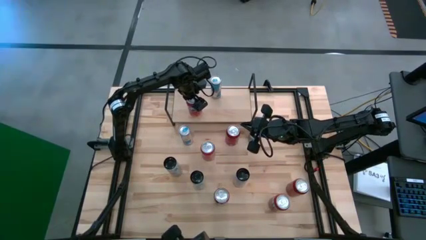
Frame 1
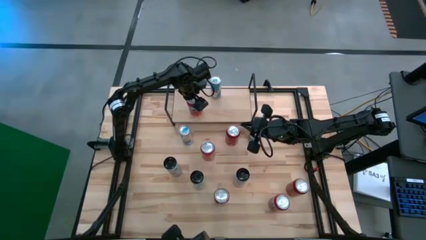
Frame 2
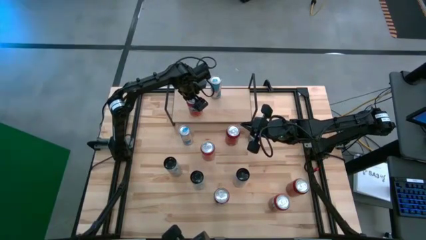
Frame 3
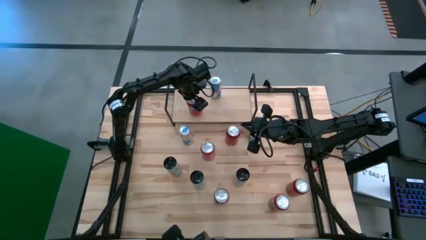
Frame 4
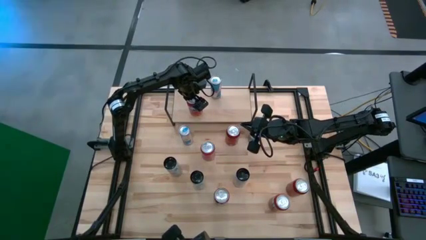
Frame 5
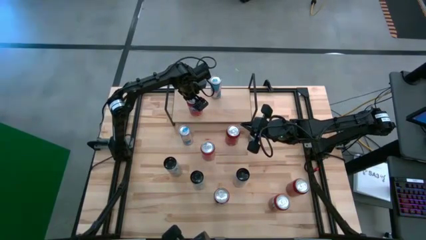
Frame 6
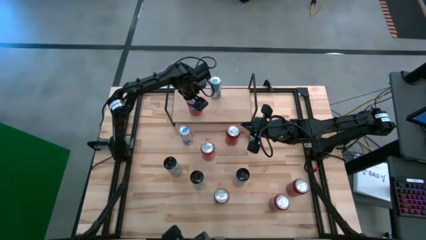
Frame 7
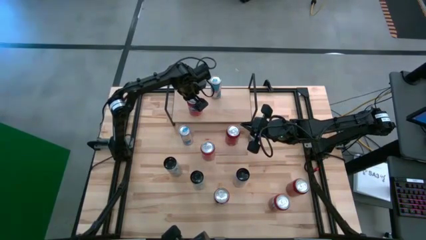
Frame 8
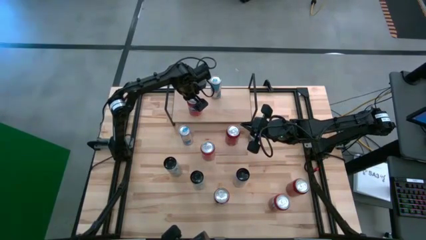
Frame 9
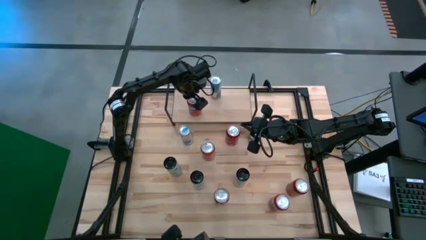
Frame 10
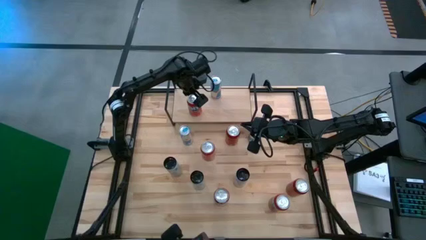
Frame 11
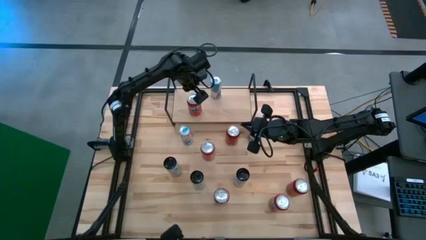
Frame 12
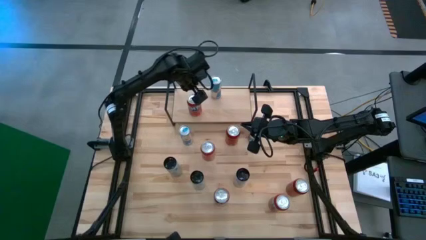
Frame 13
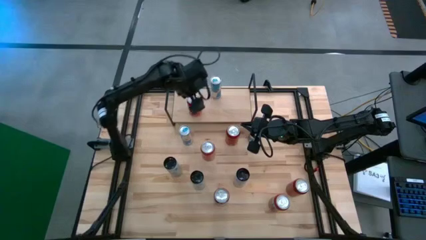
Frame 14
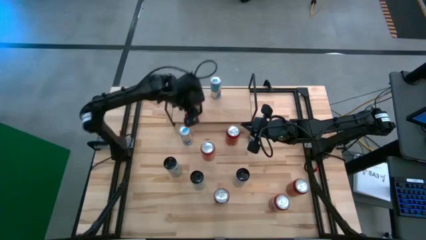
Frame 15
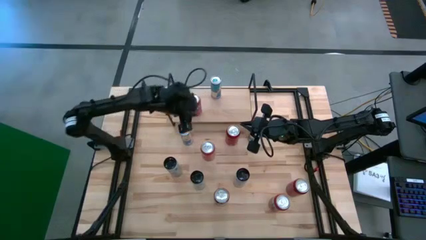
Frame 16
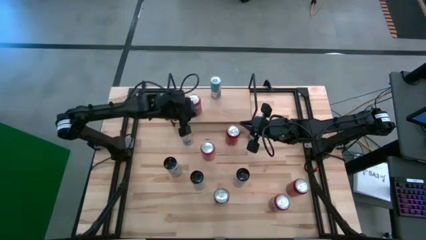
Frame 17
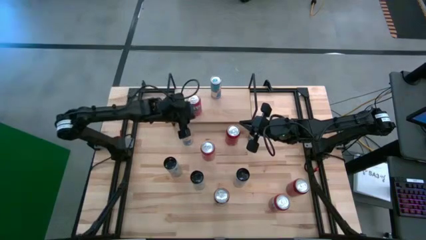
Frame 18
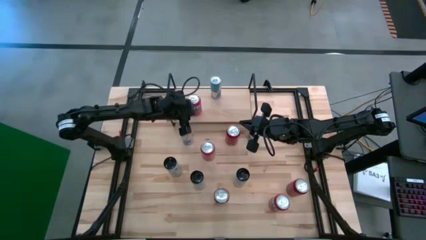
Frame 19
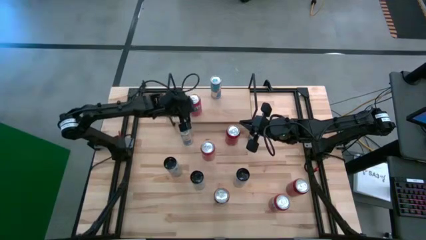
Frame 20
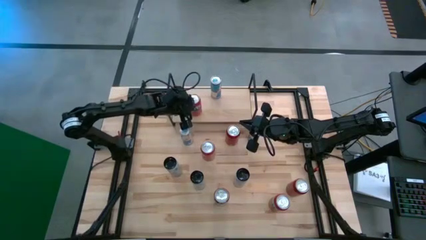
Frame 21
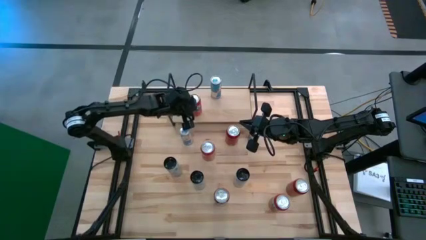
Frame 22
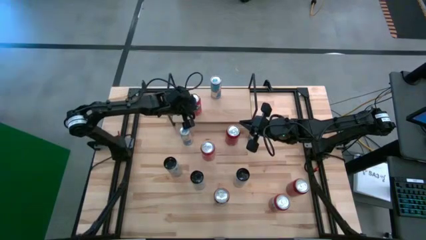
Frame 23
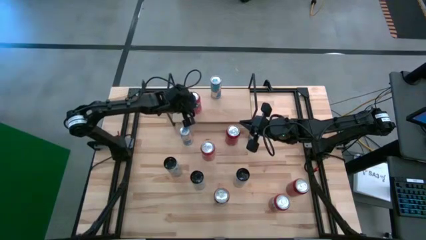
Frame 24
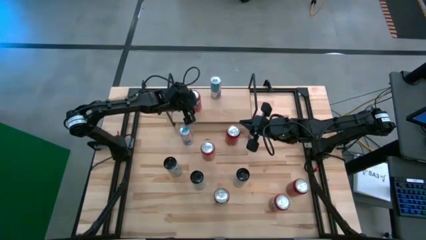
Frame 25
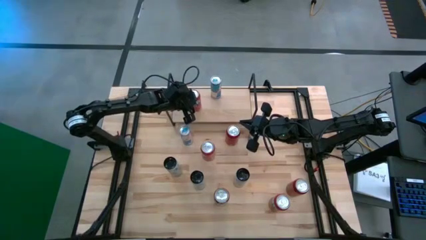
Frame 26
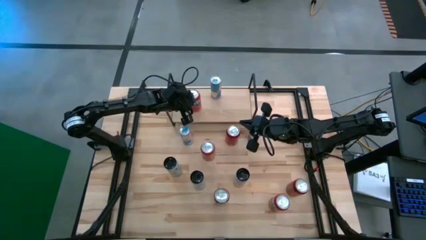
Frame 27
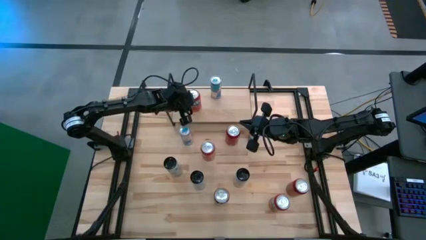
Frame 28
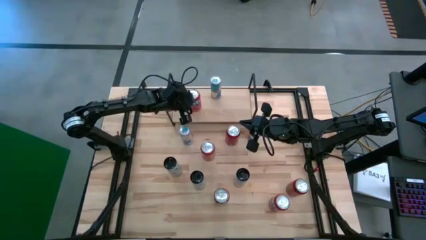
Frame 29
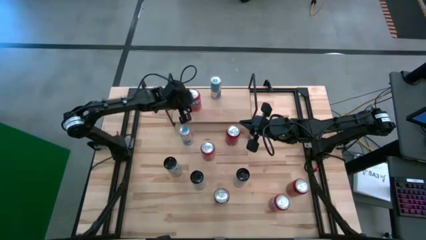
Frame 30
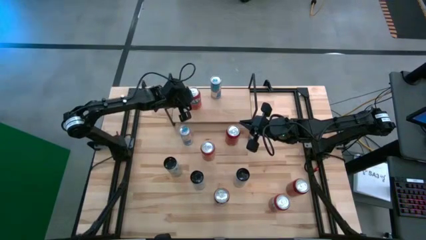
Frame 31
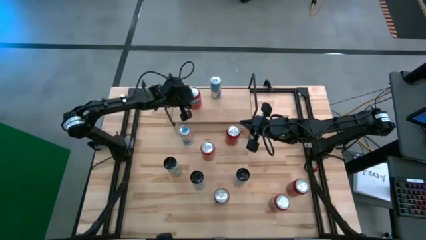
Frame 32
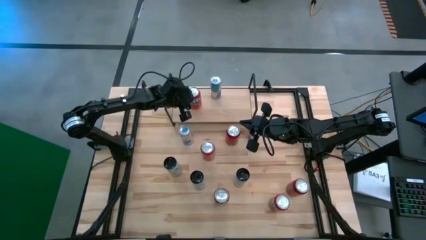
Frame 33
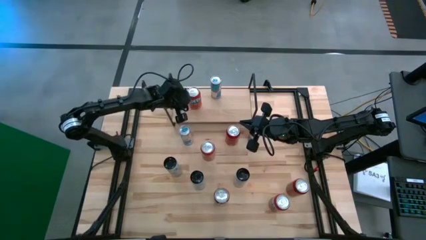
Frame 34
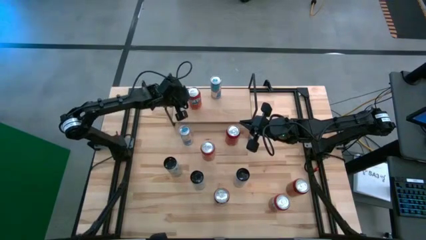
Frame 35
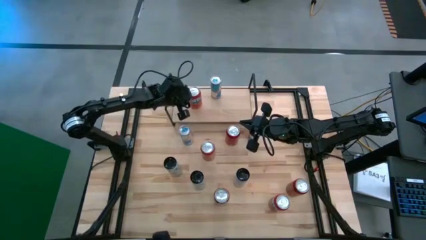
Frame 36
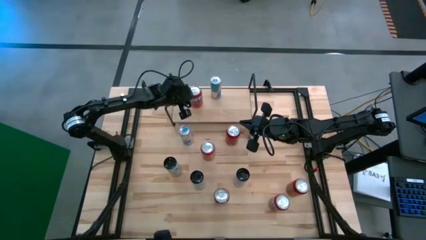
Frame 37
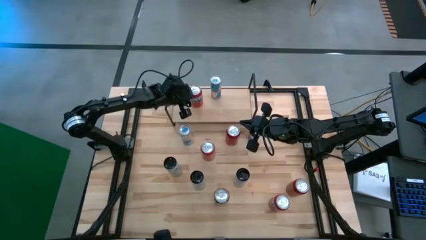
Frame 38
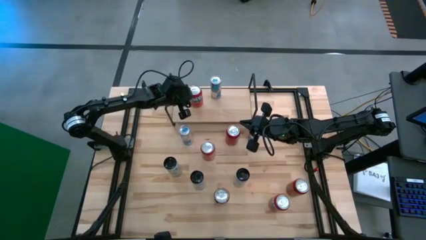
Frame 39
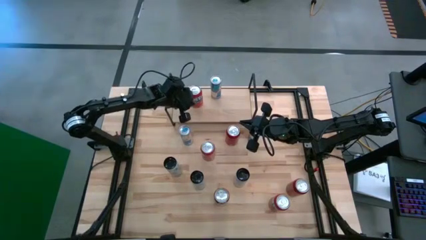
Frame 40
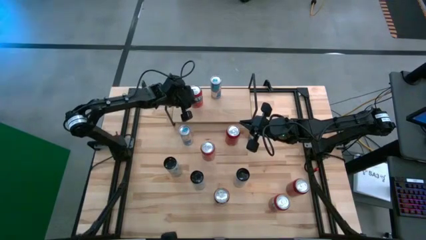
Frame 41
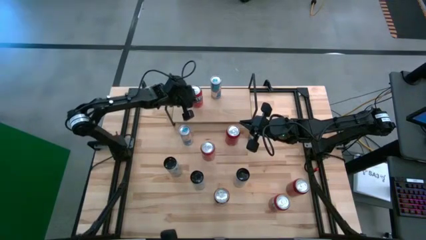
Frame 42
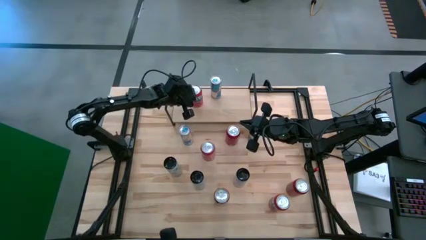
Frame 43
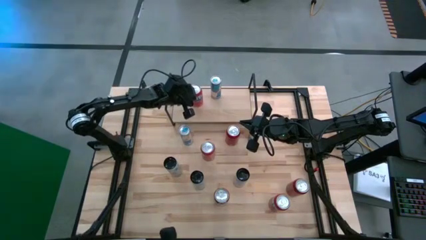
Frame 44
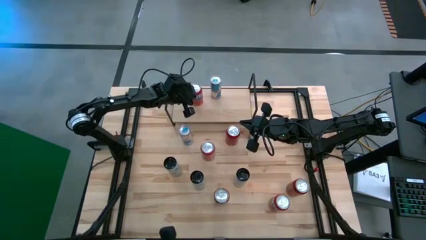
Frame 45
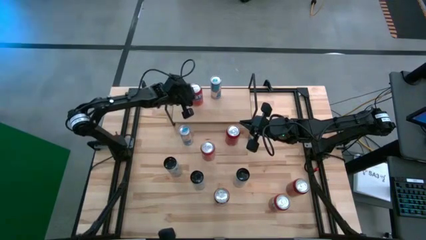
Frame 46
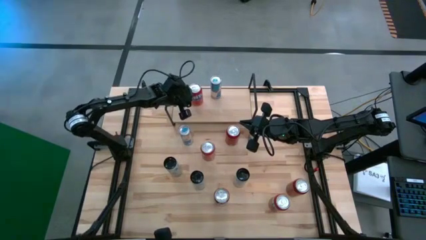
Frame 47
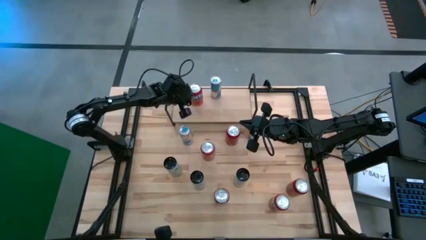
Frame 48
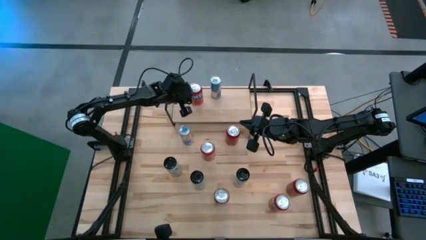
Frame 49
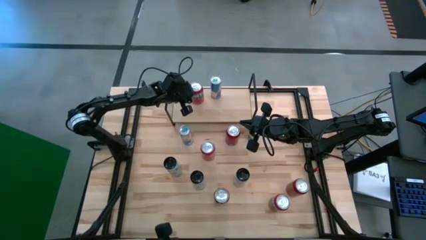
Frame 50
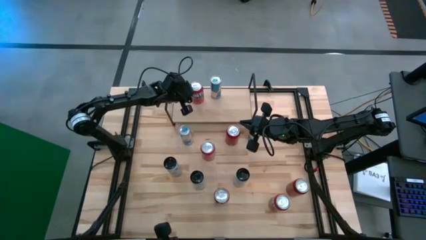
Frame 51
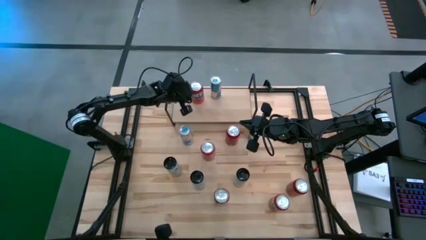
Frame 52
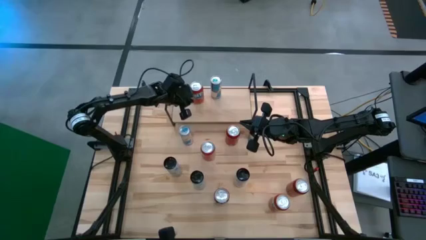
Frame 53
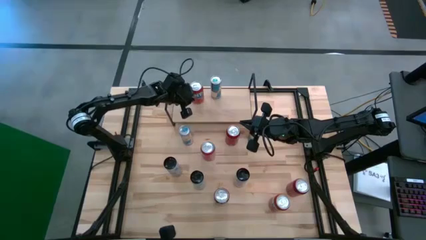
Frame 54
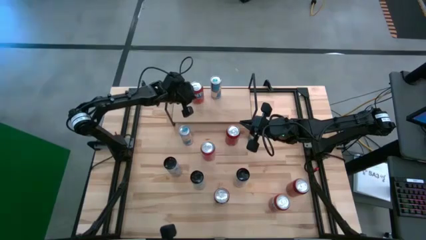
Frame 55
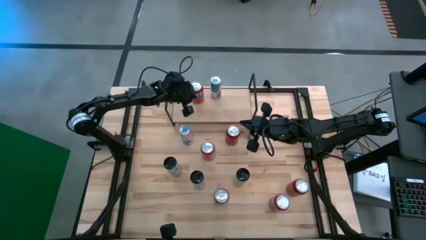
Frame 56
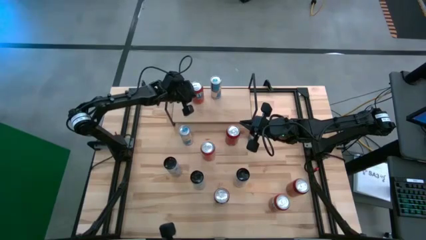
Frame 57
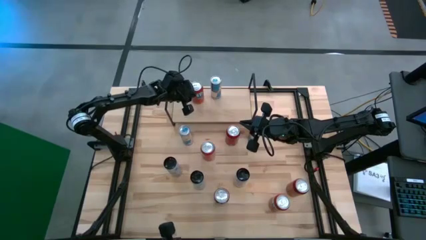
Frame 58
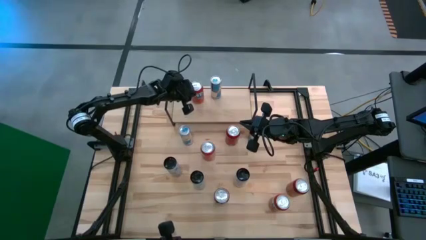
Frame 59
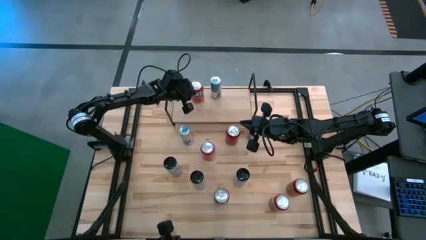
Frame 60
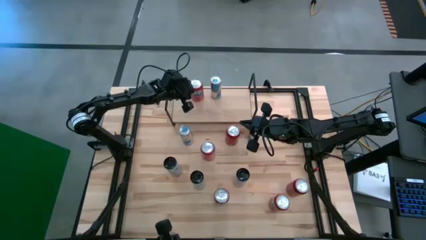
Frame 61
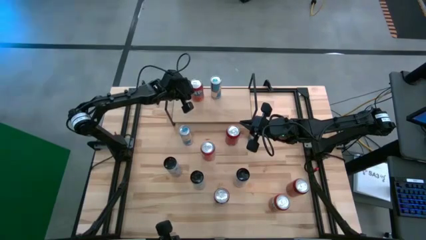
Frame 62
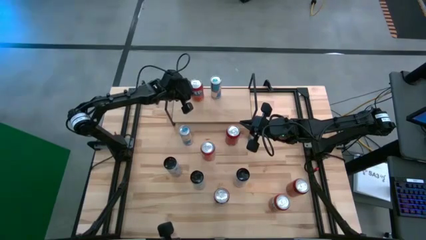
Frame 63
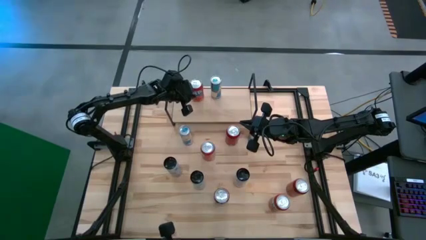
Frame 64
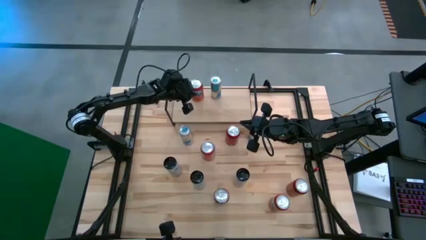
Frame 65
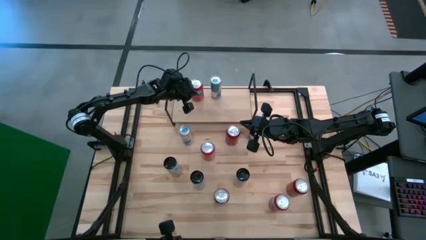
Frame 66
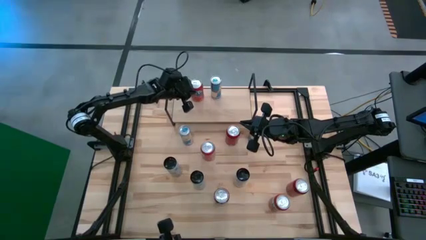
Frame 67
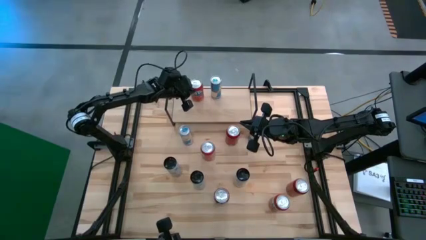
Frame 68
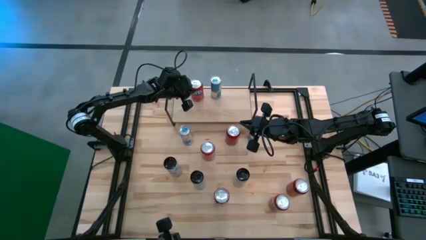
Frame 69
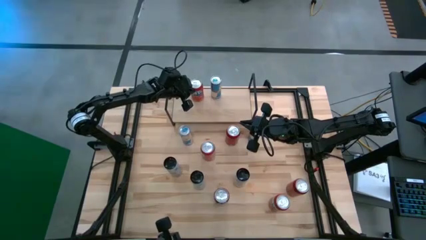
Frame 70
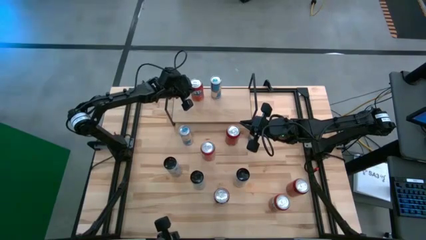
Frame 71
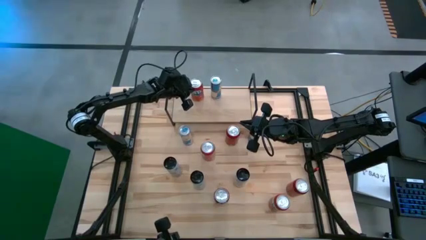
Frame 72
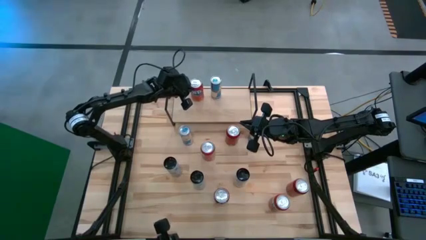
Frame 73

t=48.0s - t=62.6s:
Task: Place canned beverage on shelf
Put the bottom left orange soda can on the shelf
